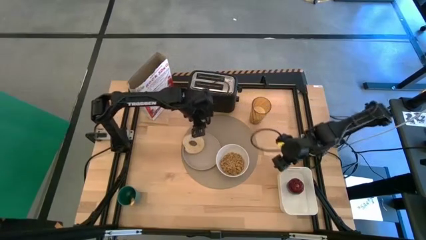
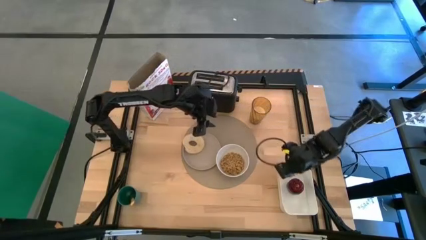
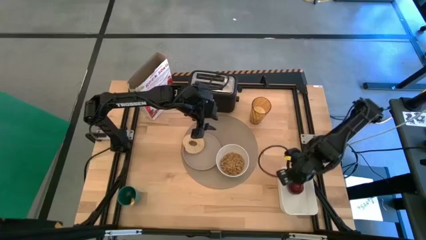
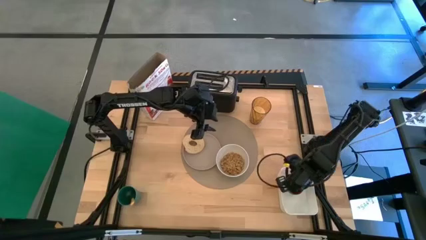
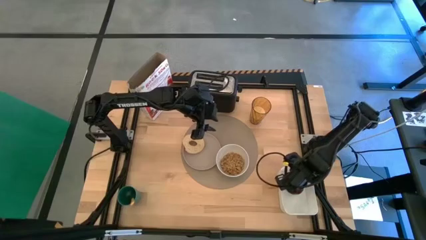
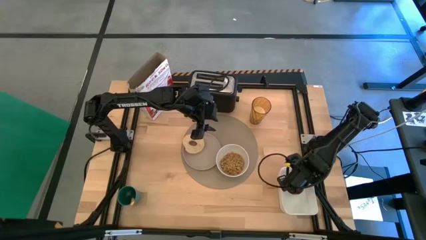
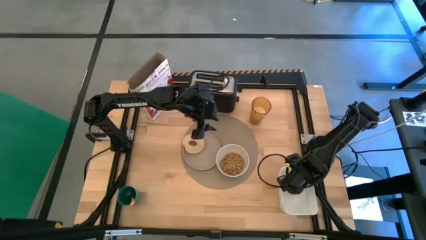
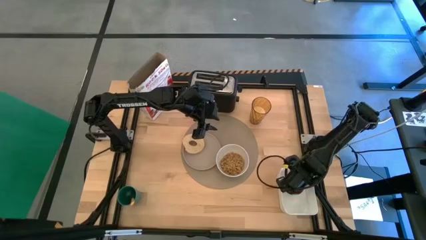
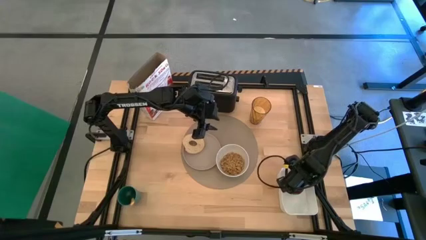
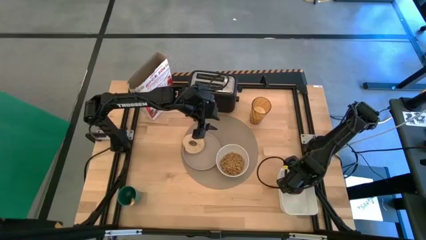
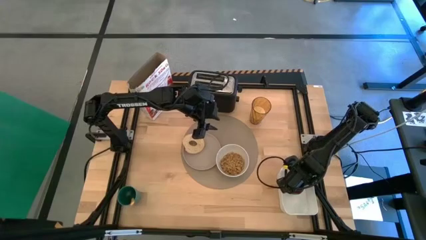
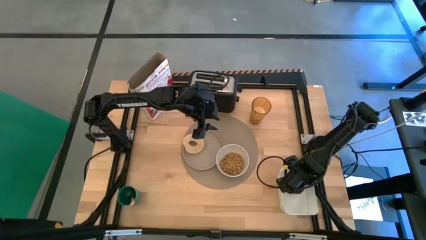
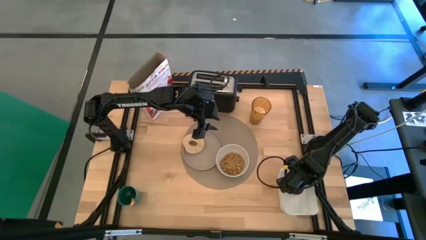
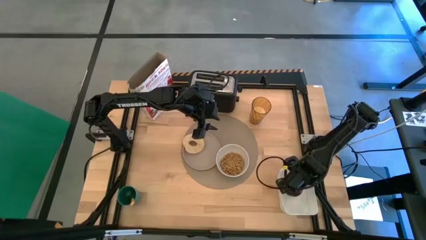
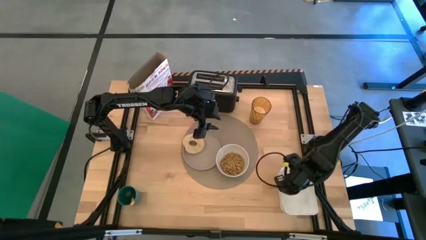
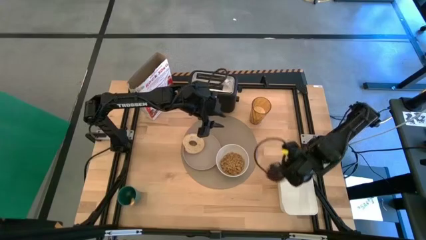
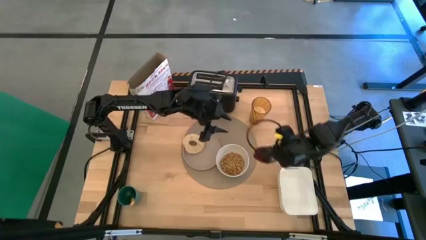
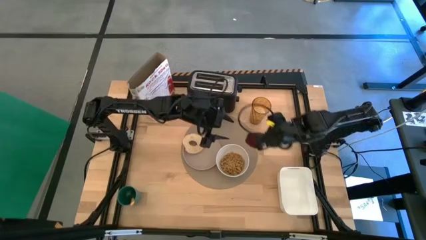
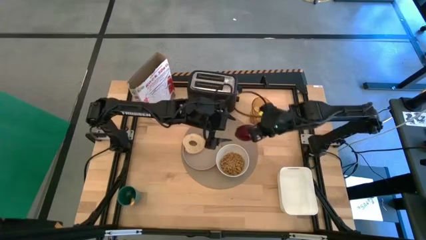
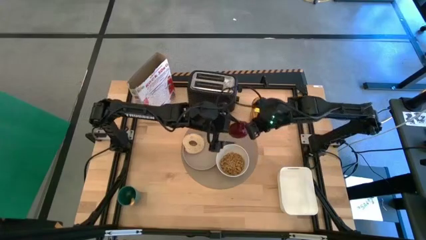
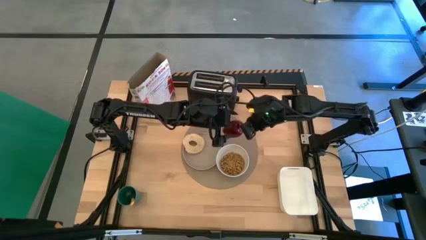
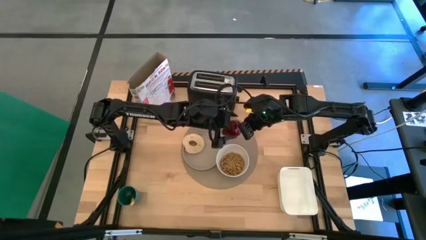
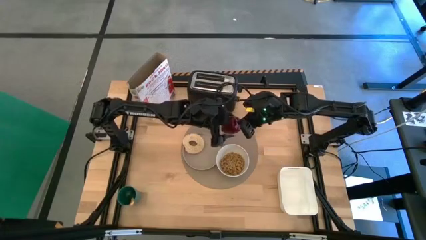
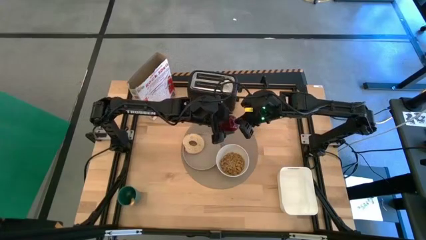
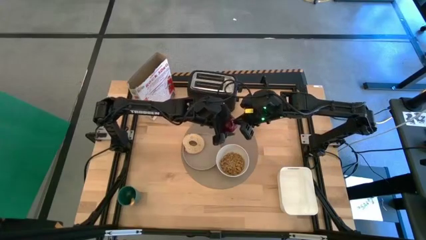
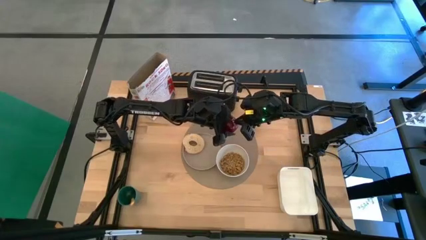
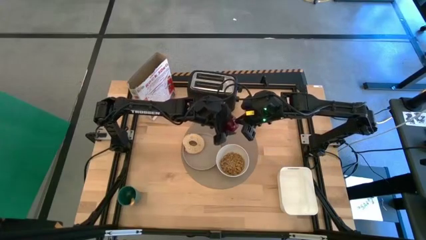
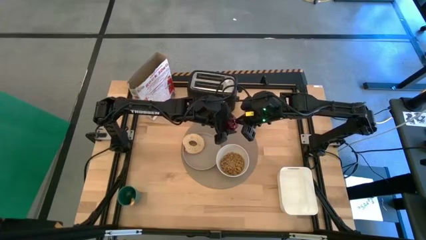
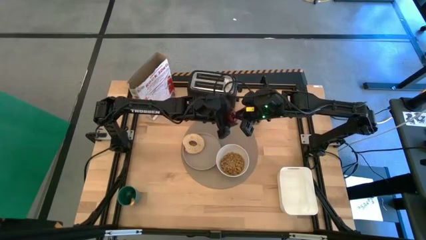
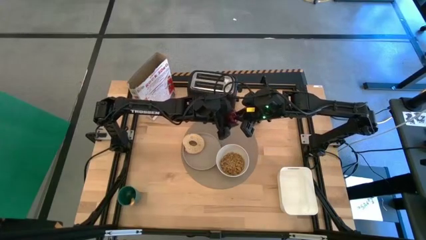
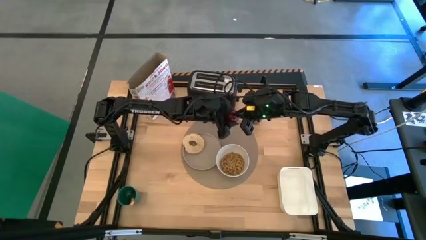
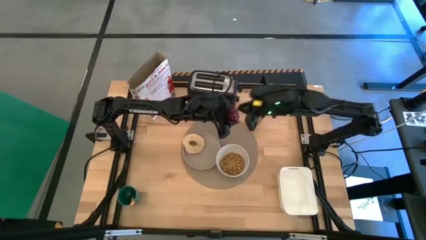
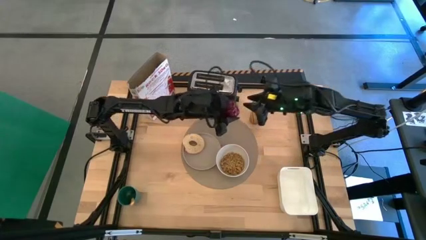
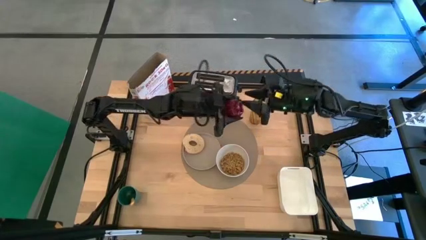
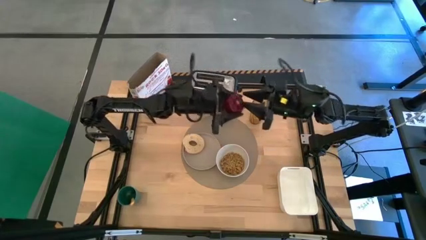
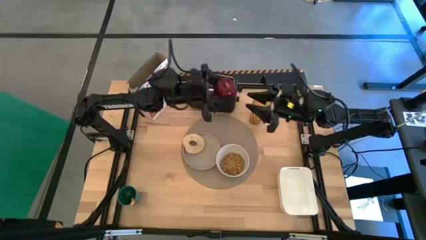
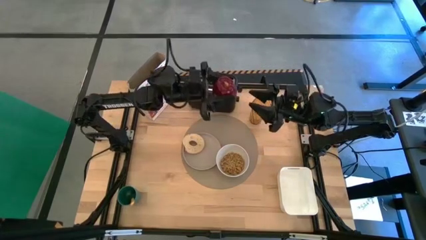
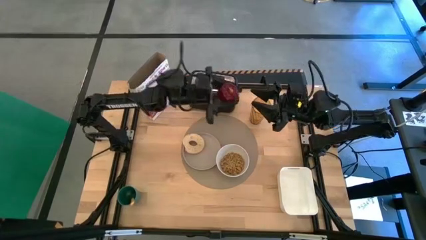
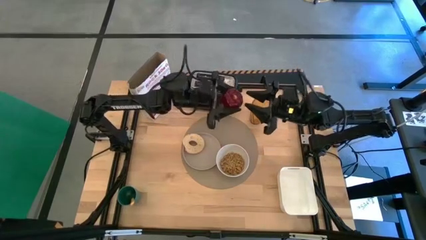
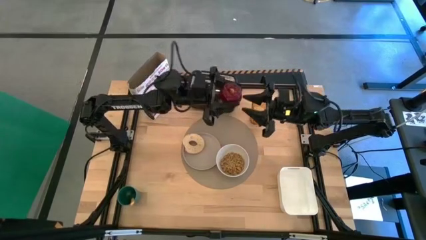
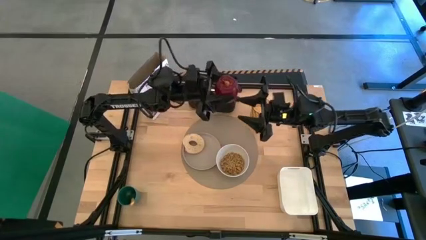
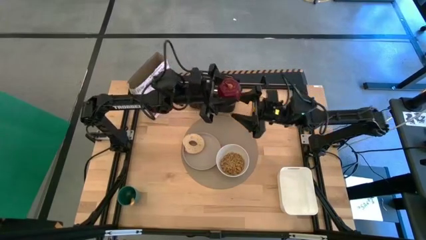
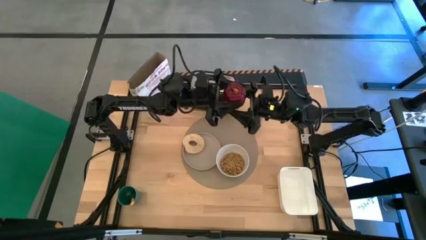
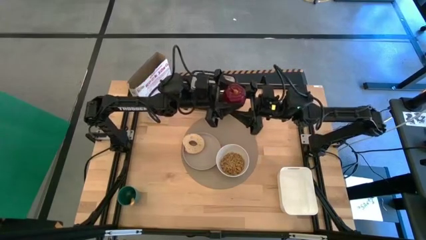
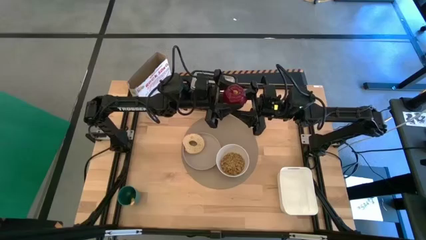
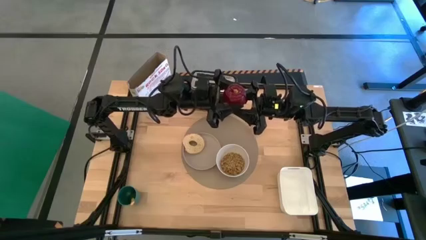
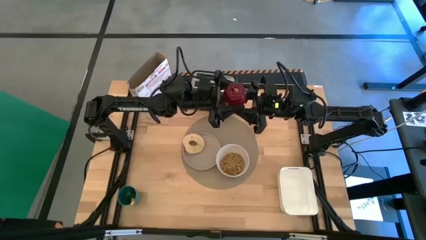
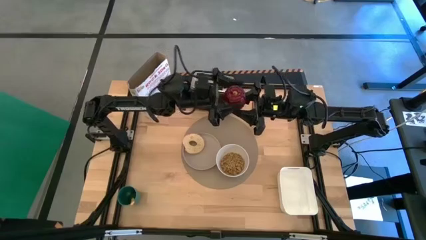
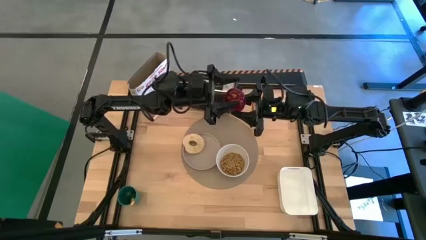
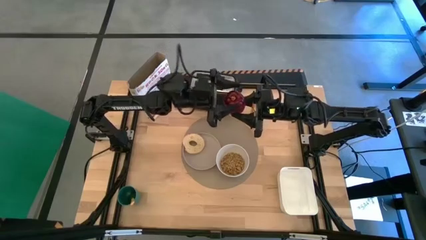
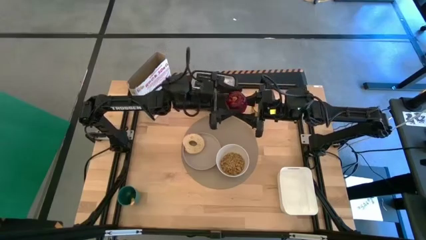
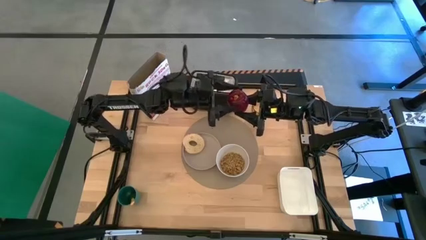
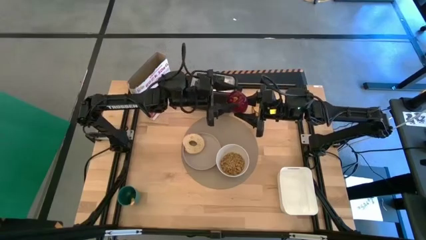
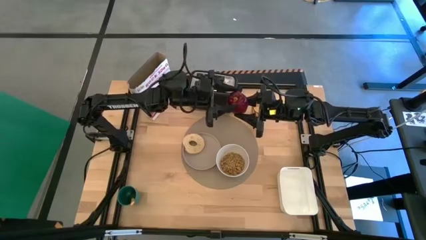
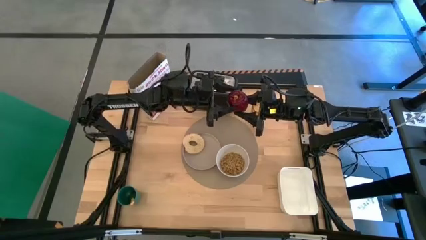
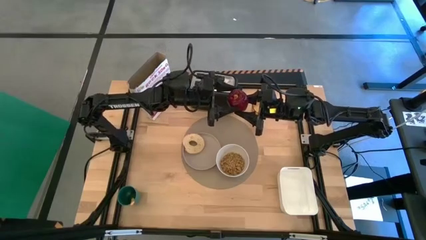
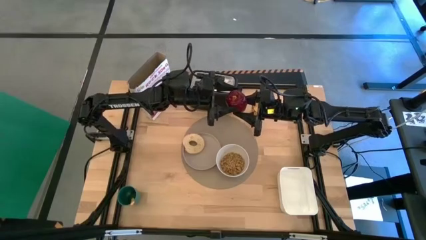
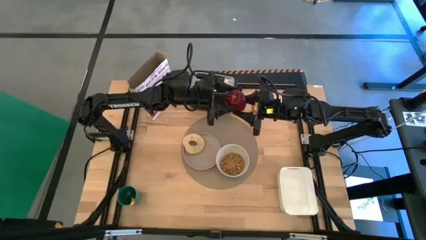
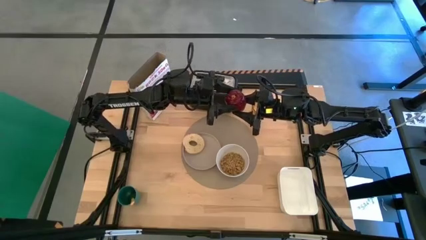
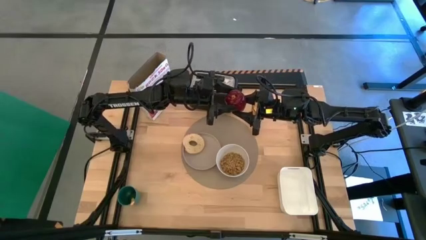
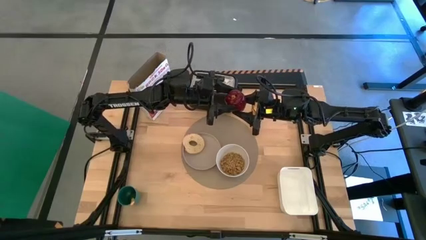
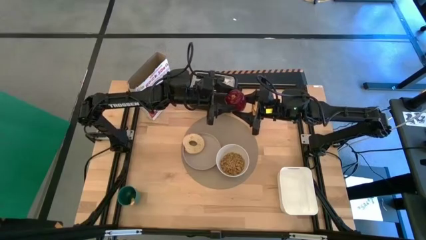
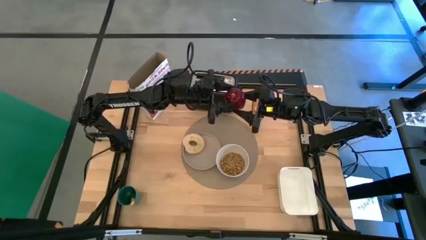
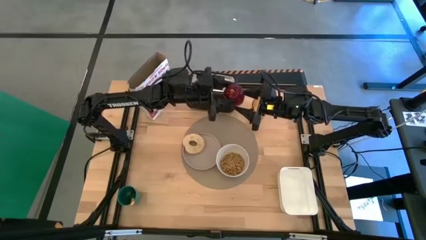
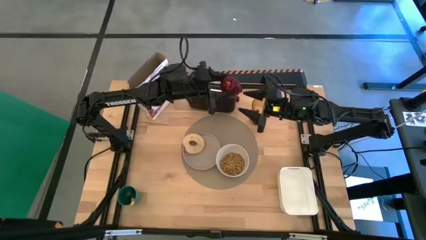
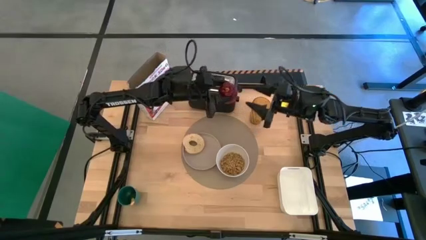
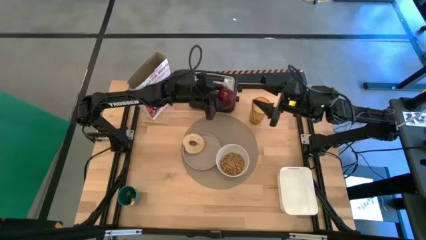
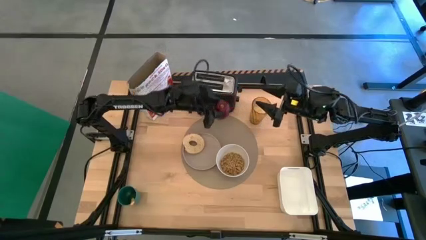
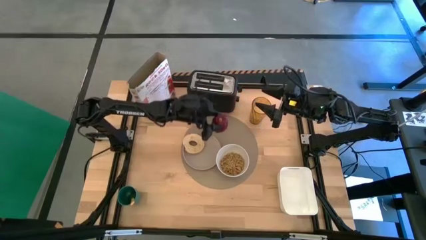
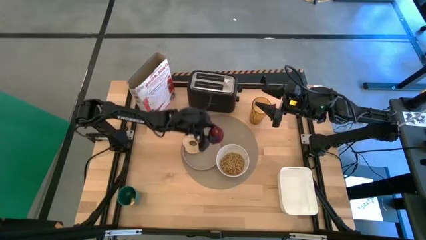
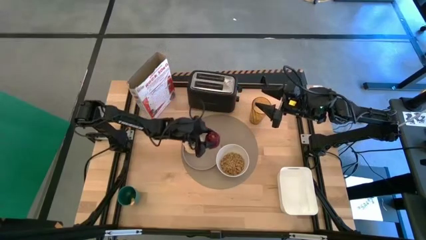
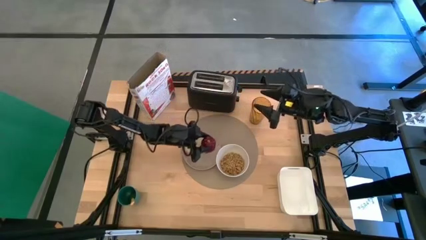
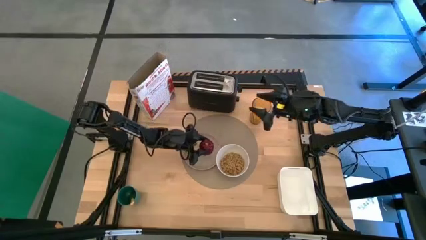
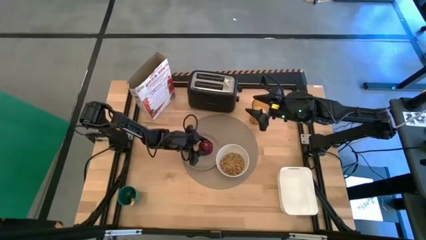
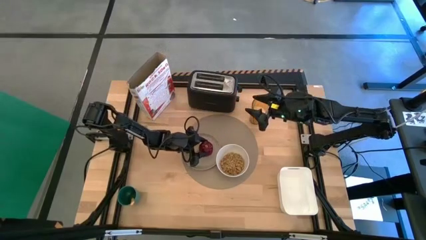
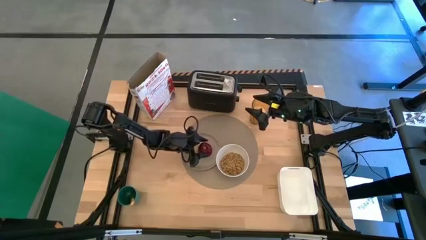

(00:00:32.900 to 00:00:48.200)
Task: Arrange a breakfast setting
Put the apple on the gray plate

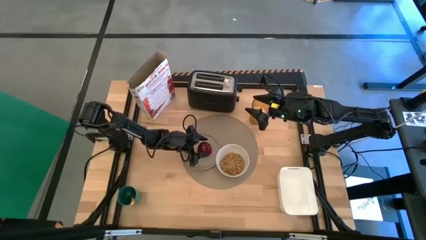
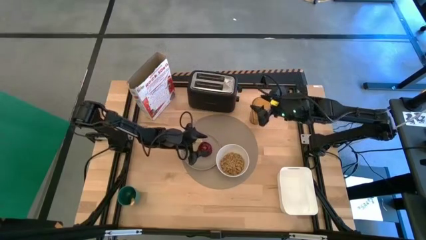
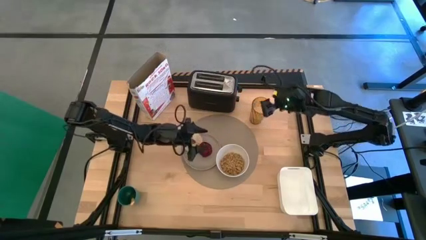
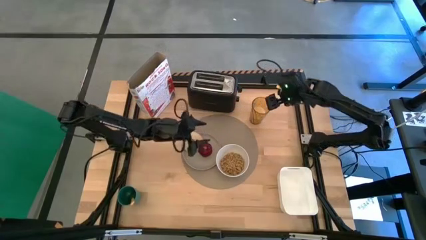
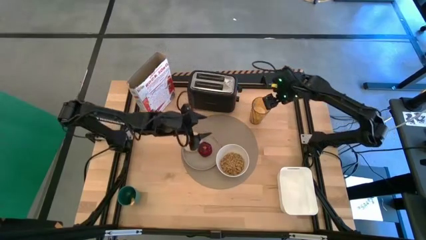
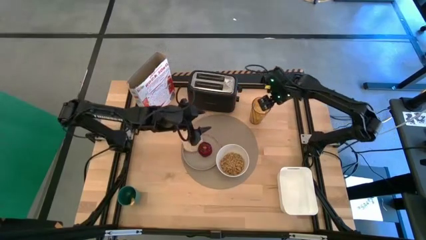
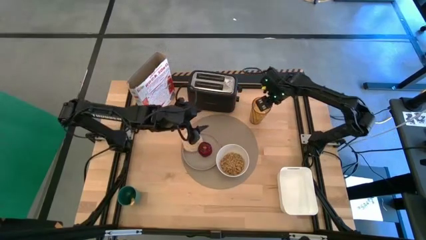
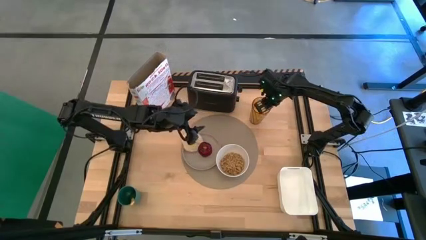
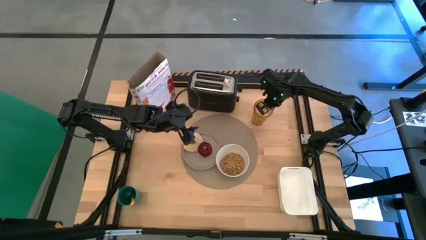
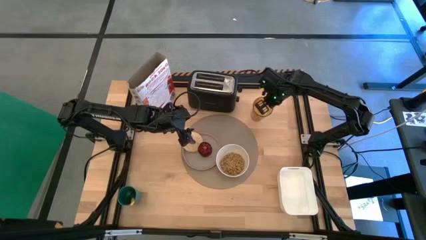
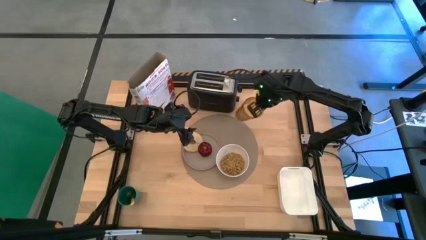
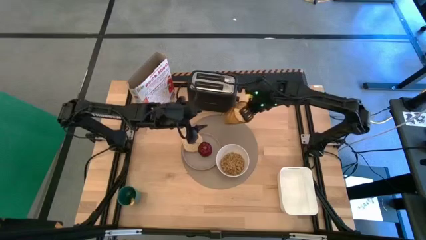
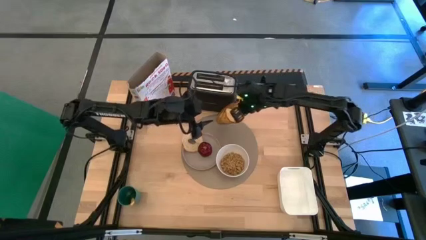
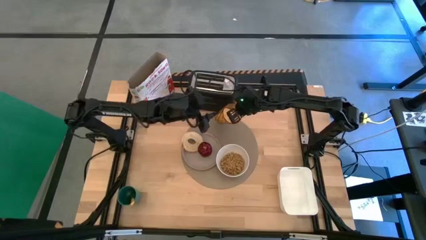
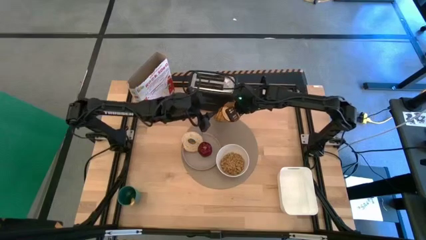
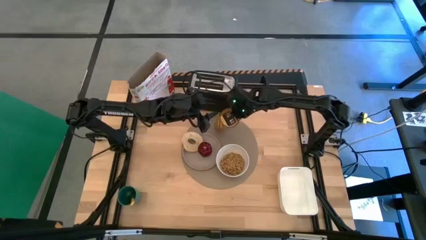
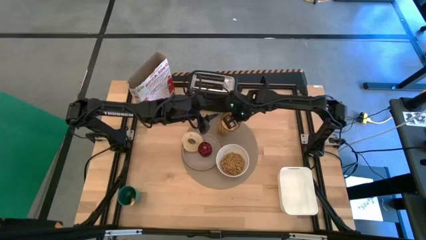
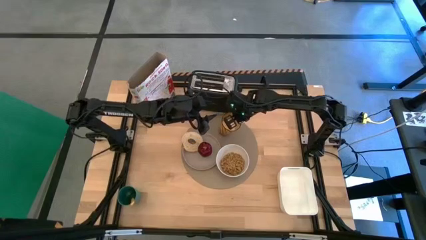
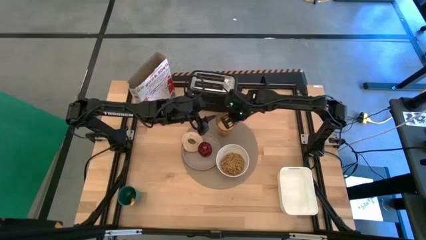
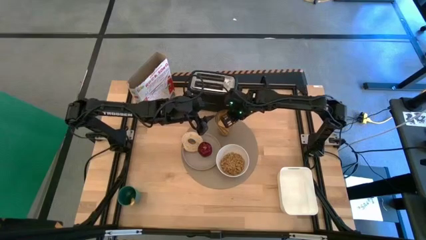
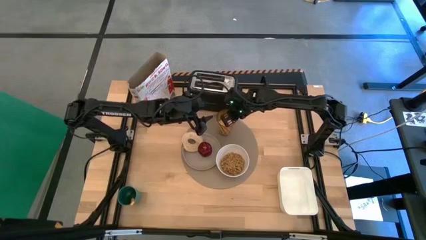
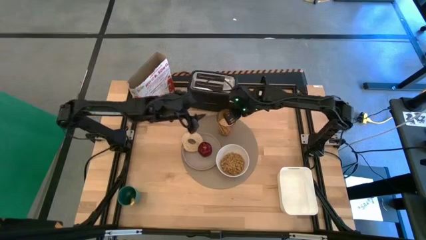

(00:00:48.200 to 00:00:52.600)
Put the glass on the placemat to the top right of the gray plate
